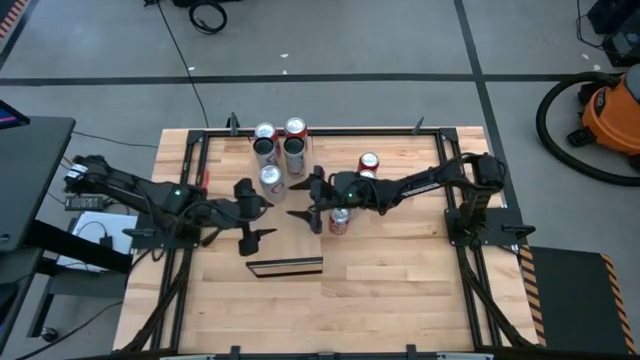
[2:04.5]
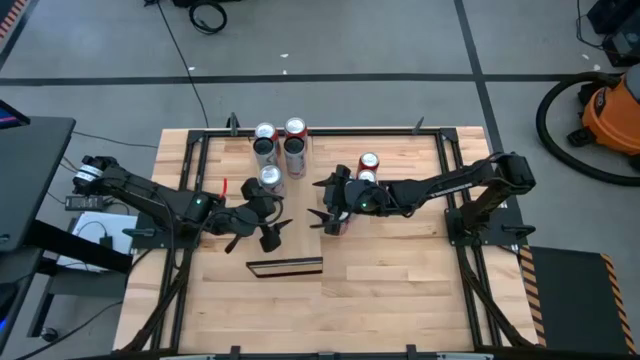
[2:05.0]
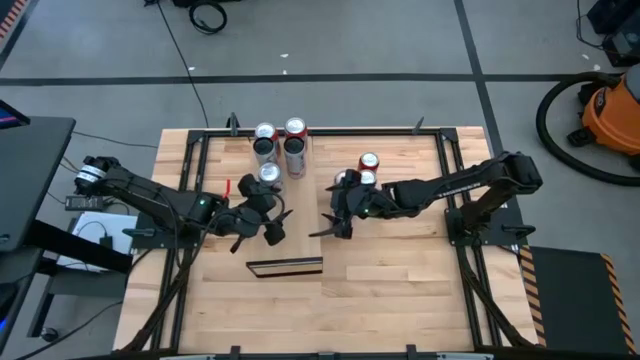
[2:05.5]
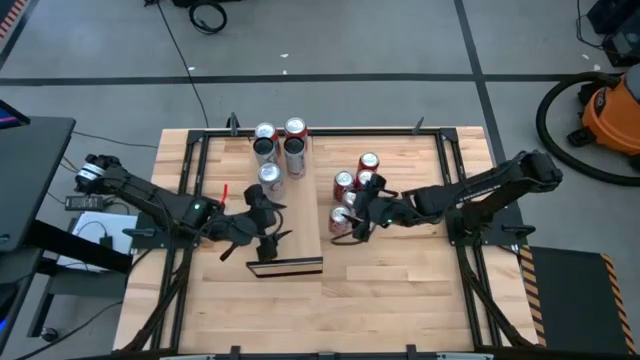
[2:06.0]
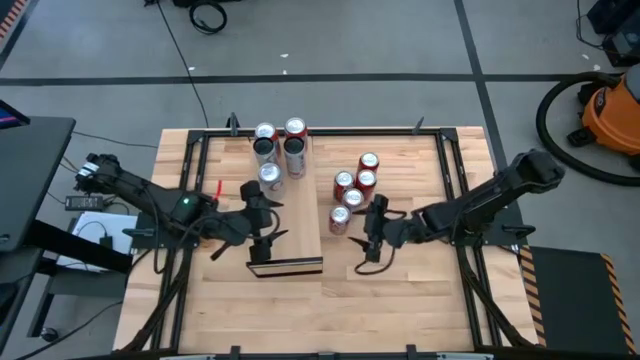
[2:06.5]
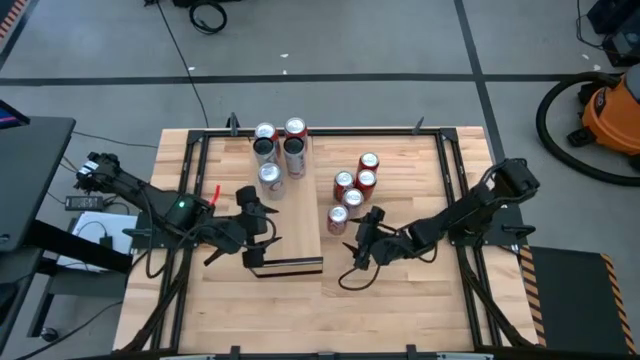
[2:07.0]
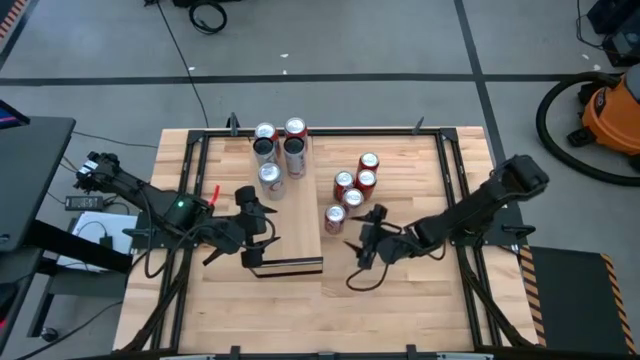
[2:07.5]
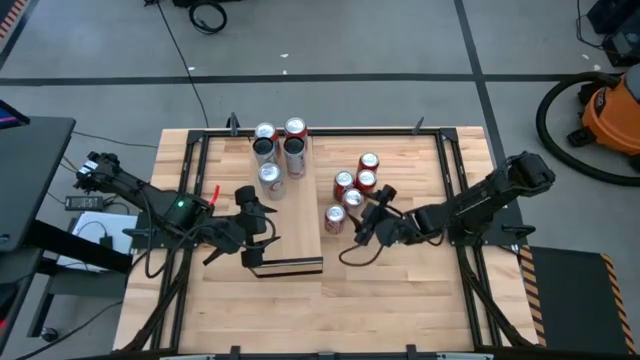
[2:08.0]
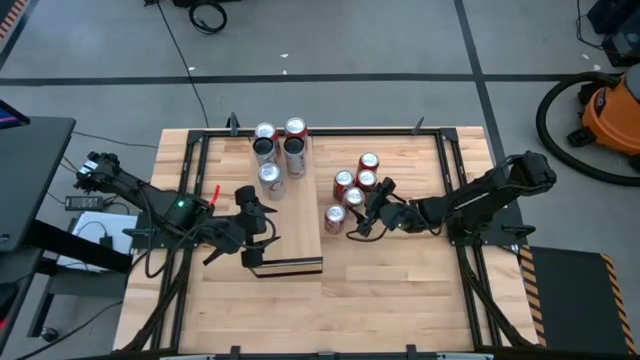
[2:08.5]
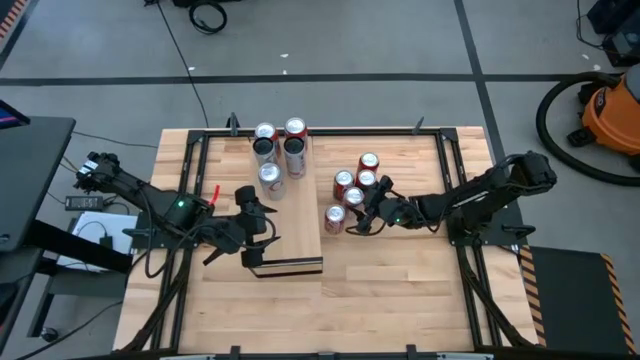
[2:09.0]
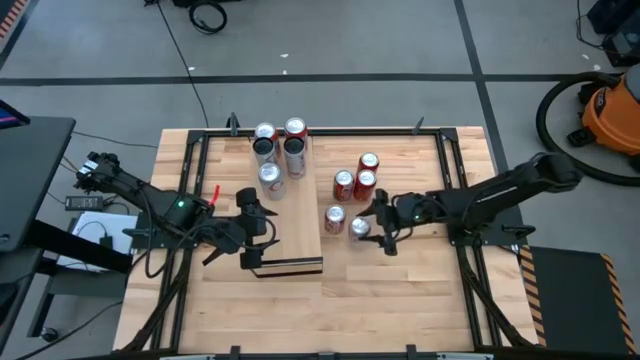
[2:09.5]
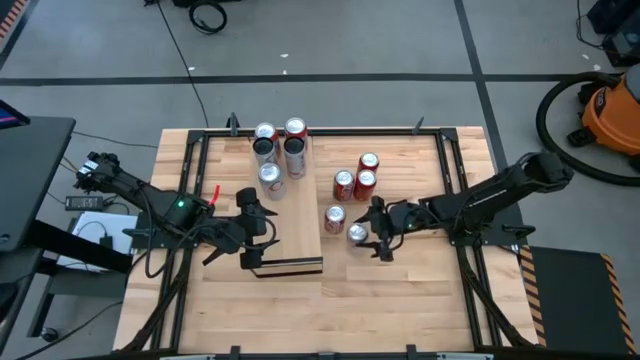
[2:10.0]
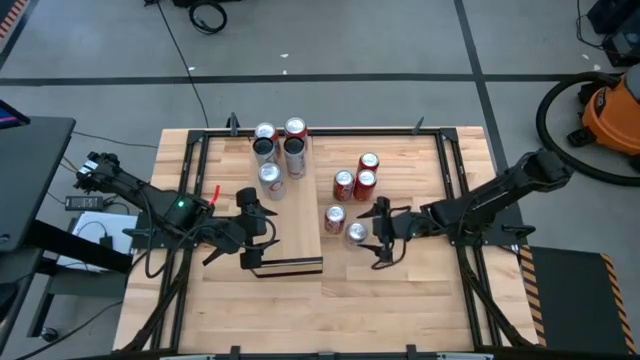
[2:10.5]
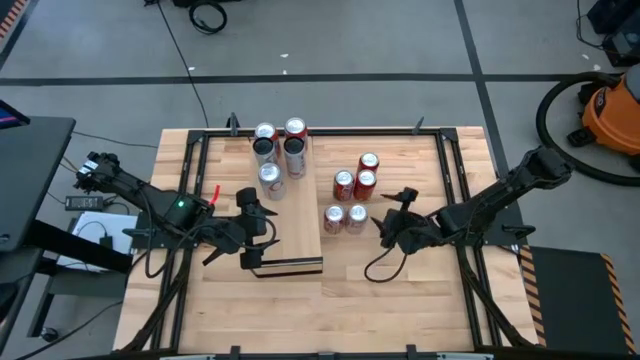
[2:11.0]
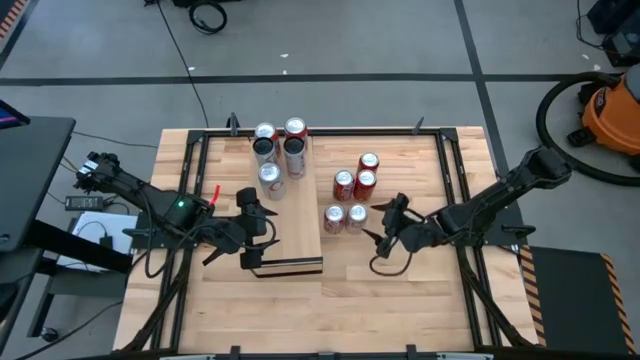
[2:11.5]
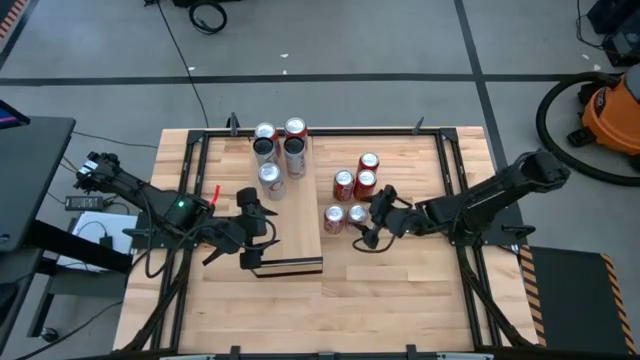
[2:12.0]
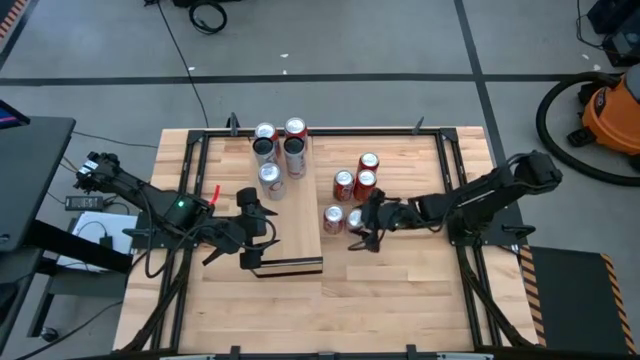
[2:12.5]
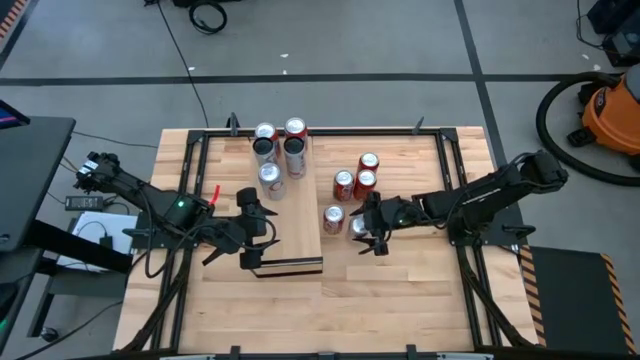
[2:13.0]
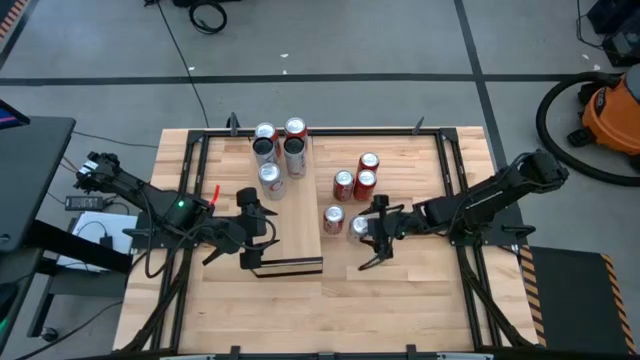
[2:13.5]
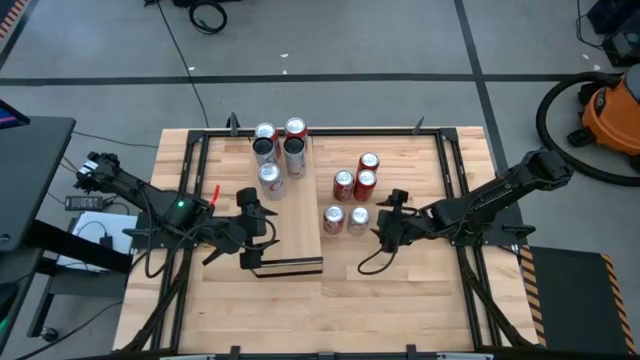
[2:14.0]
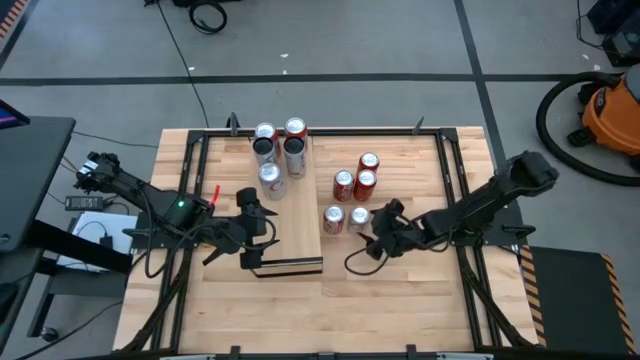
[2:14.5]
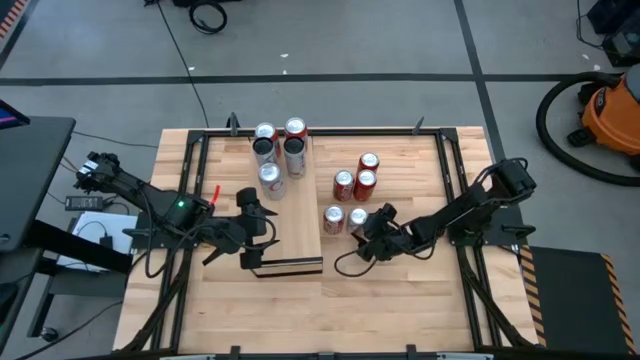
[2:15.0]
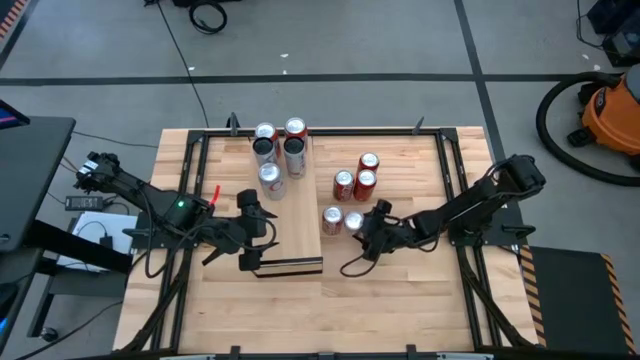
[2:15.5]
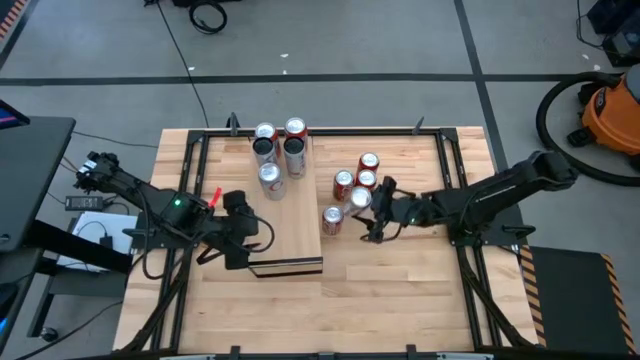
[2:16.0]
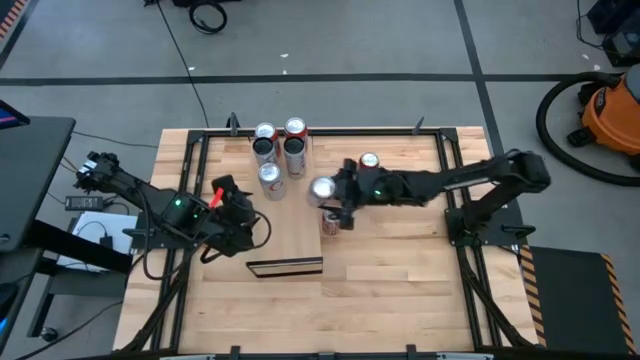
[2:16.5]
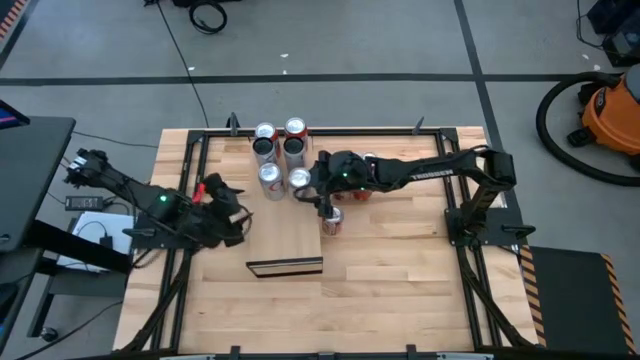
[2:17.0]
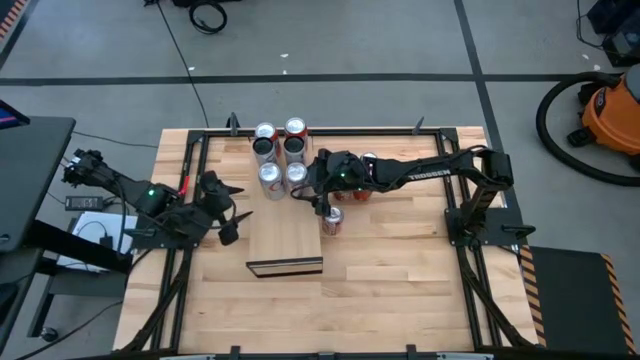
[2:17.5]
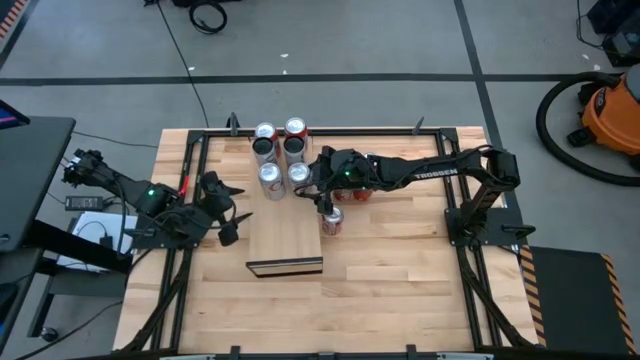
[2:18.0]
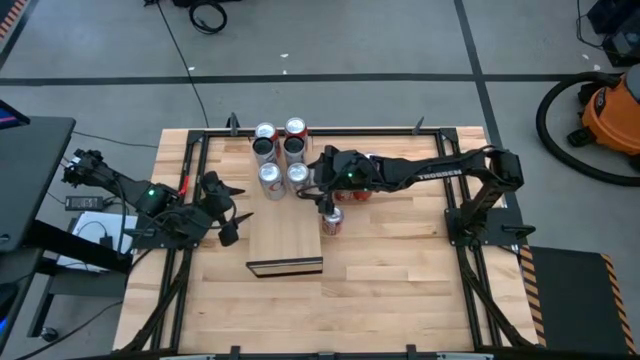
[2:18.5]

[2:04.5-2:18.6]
Task: Place canned beverage on shelf
Put the red-silver soda can on the shelf and align it with the other red-silver soda can

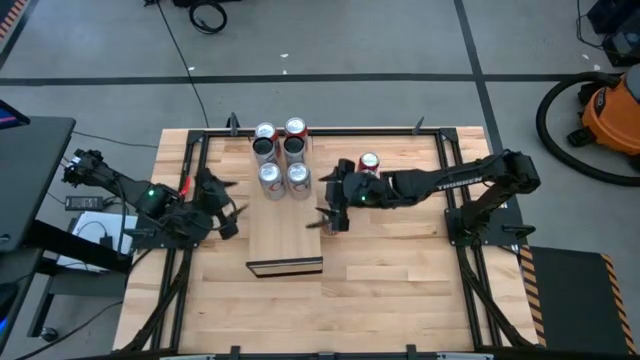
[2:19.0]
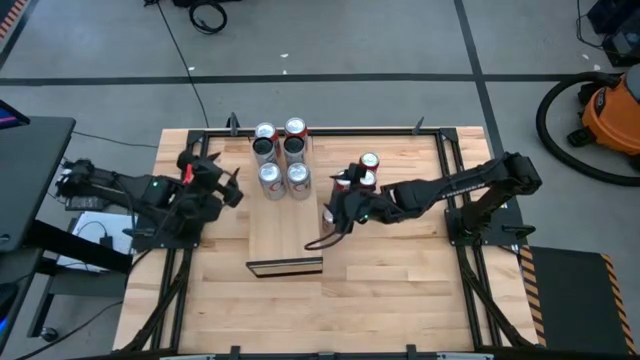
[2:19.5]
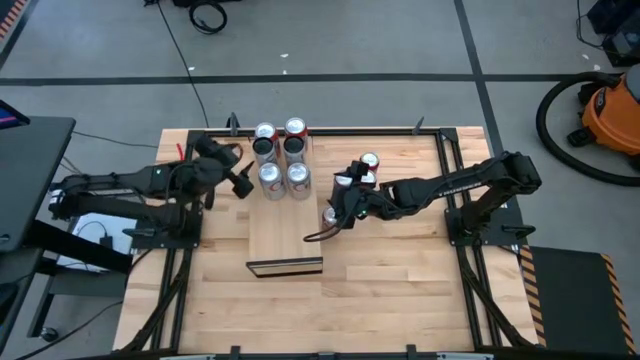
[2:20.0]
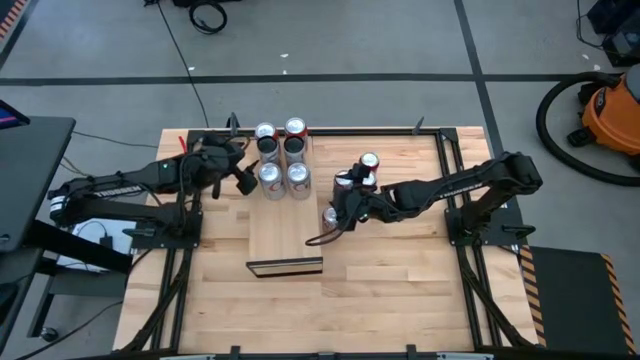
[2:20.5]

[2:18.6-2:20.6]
Adjust the white-pink soda can on the shelf

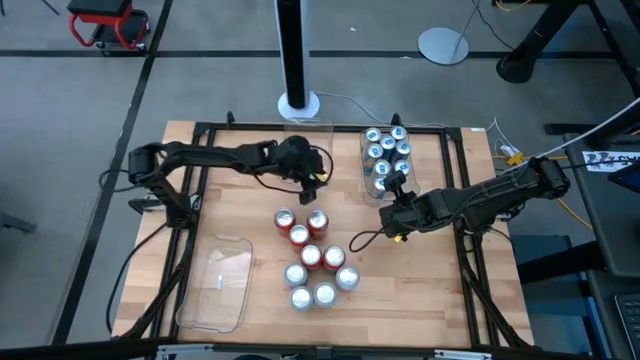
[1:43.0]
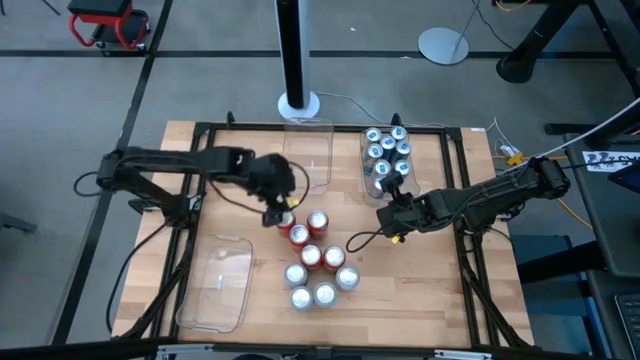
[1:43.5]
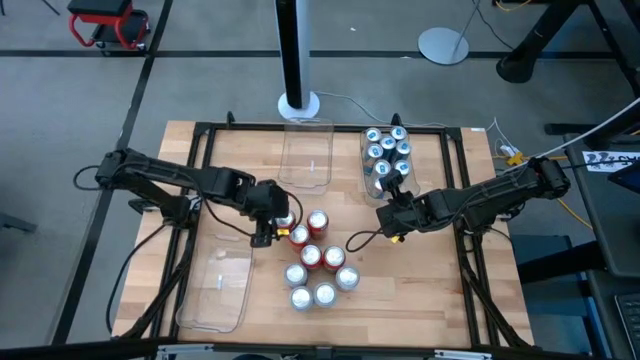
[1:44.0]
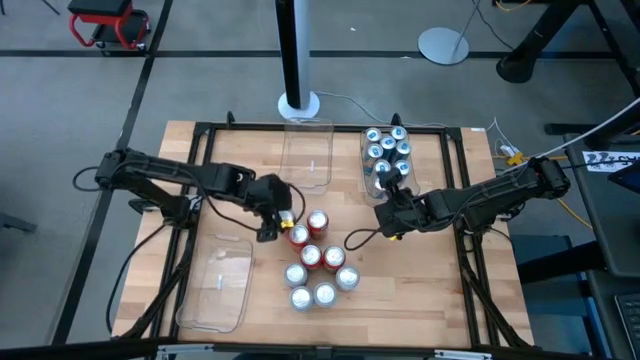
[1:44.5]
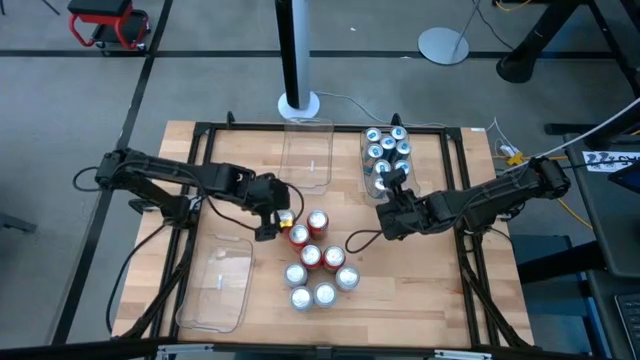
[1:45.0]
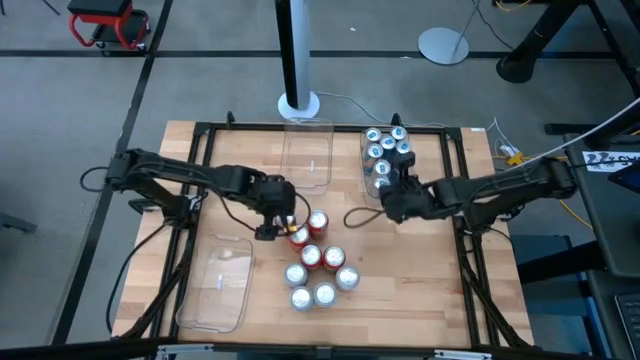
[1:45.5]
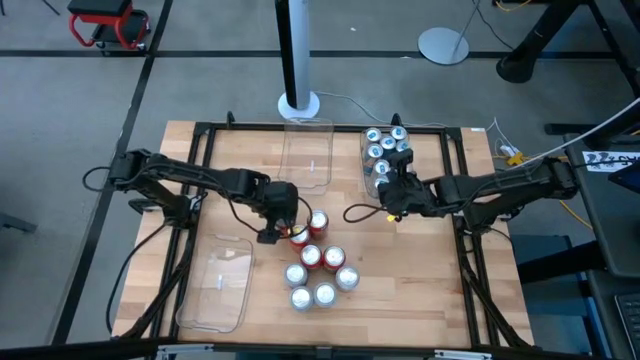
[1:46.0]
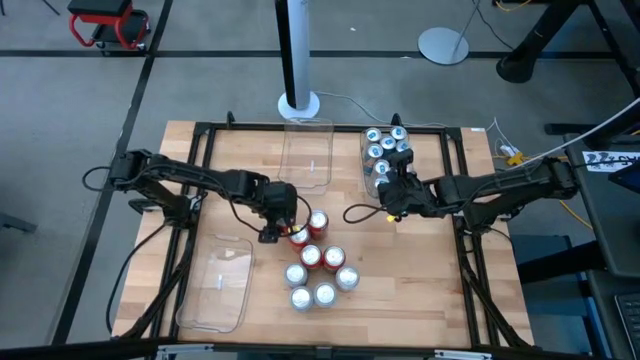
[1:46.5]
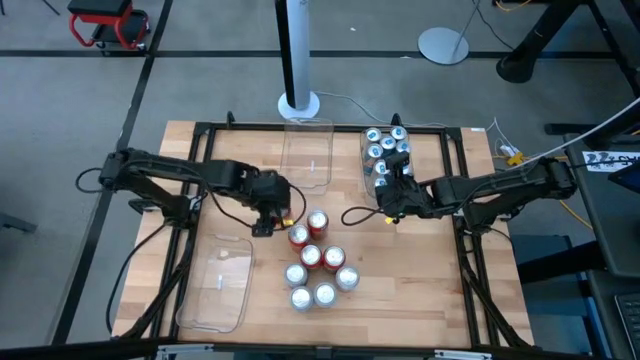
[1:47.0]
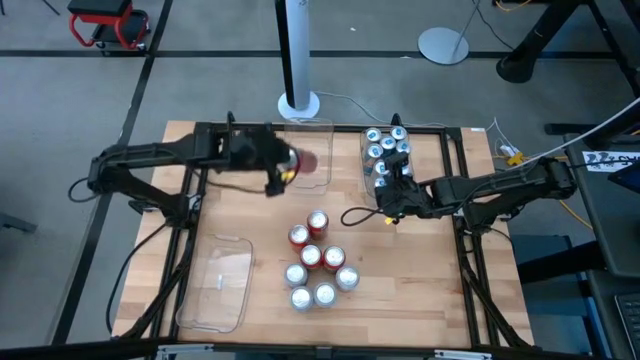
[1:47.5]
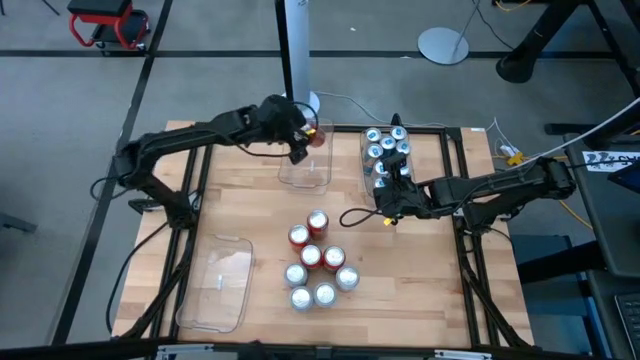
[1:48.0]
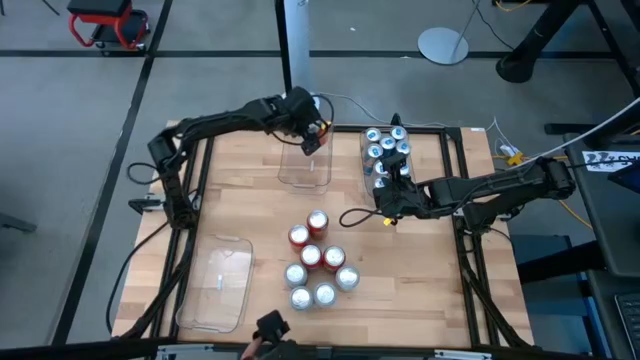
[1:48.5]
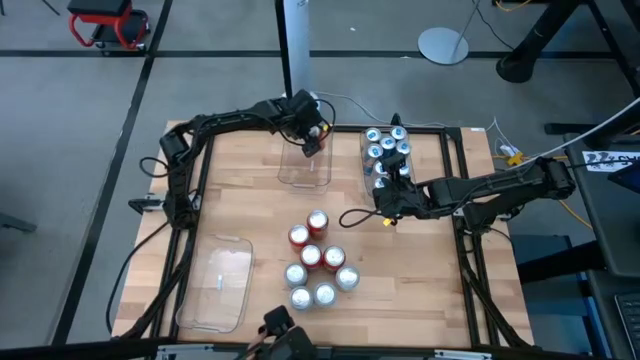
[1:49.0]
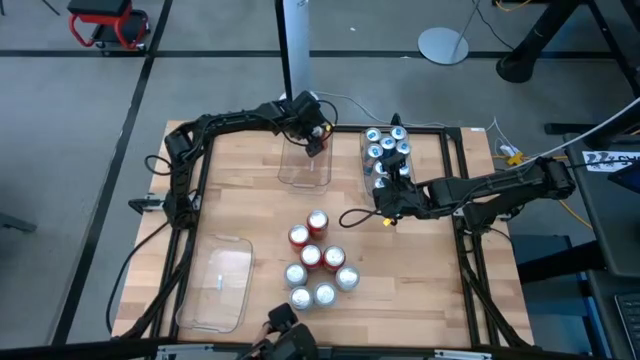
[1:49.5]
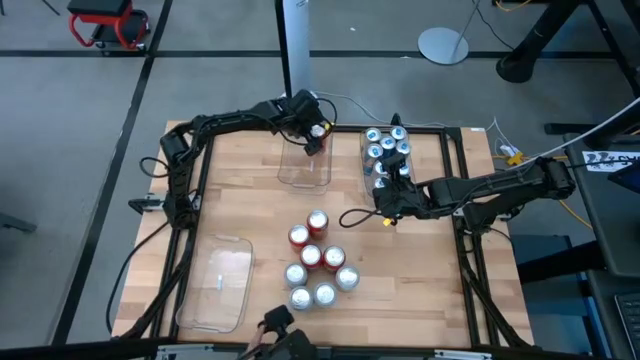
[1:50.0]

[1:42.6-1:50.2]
Task: Sort soda cans
Put the red soda can into the top center transparent bin
